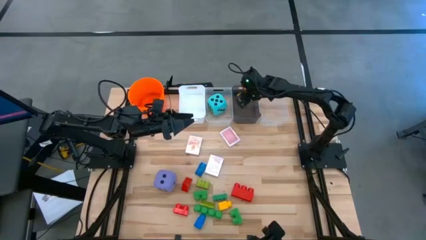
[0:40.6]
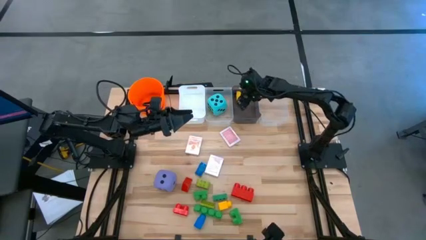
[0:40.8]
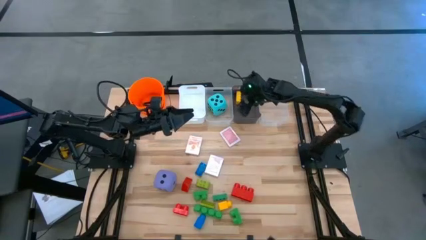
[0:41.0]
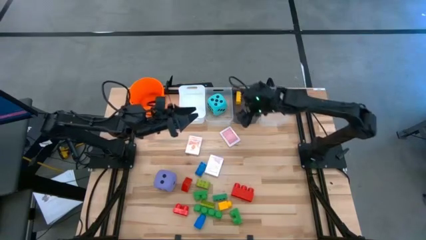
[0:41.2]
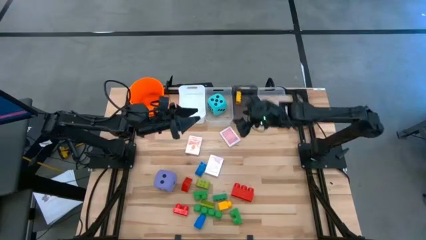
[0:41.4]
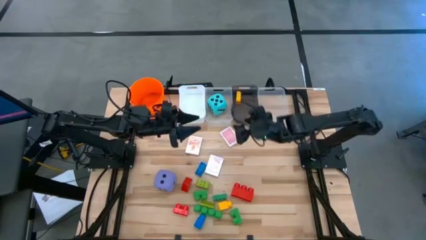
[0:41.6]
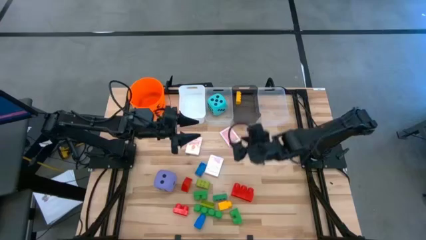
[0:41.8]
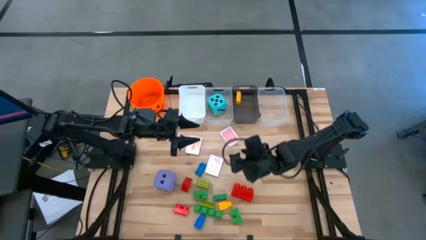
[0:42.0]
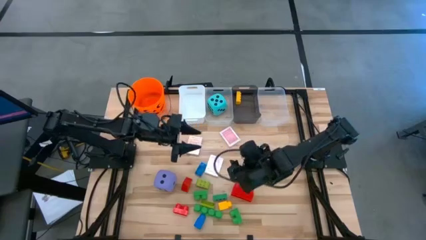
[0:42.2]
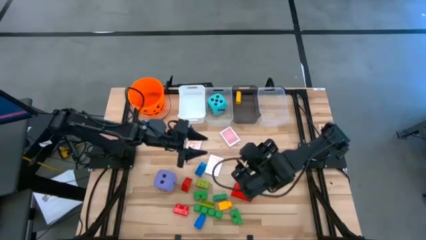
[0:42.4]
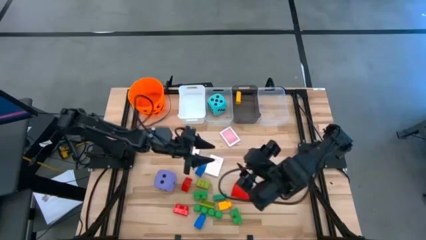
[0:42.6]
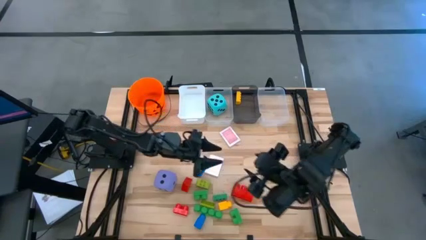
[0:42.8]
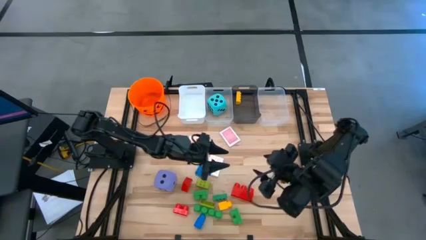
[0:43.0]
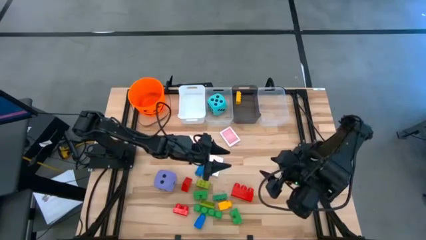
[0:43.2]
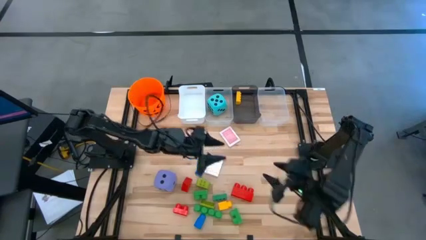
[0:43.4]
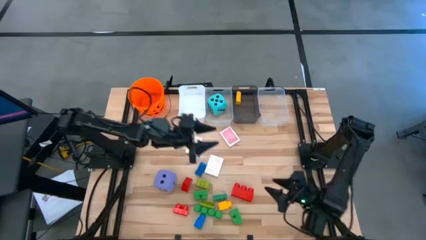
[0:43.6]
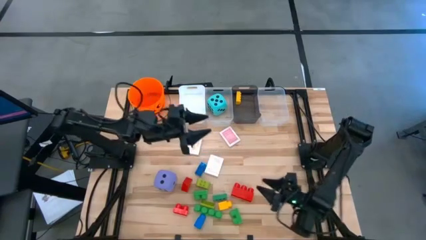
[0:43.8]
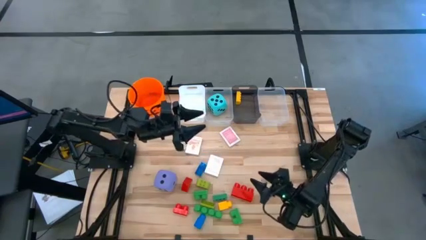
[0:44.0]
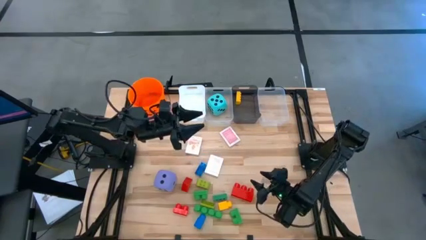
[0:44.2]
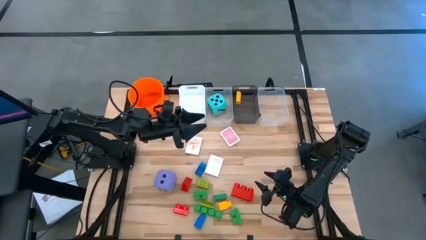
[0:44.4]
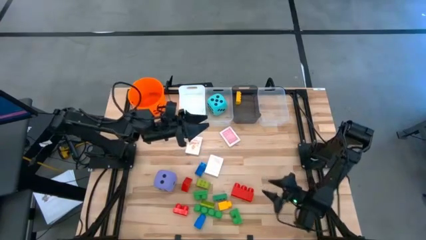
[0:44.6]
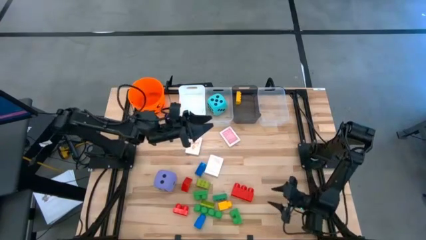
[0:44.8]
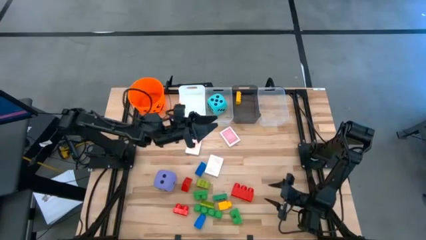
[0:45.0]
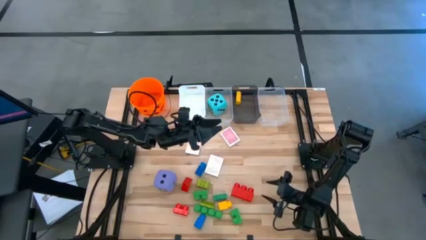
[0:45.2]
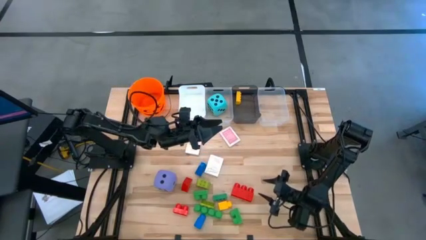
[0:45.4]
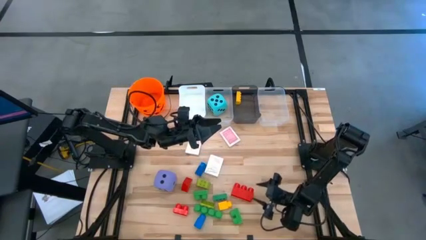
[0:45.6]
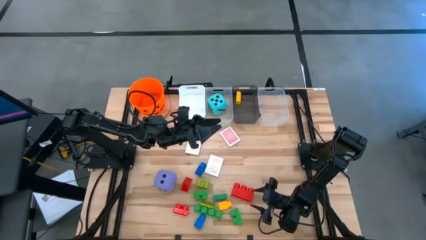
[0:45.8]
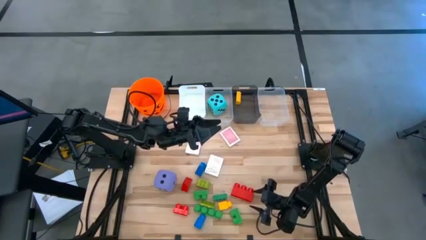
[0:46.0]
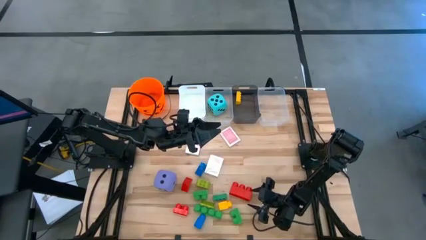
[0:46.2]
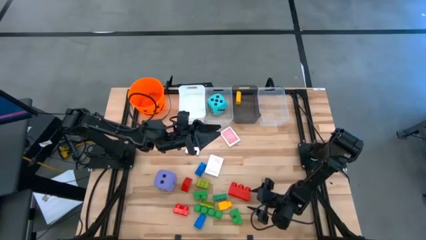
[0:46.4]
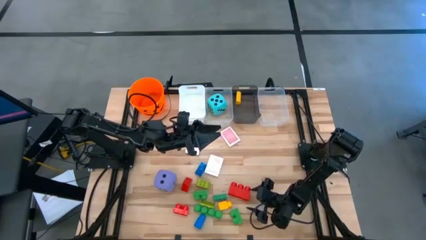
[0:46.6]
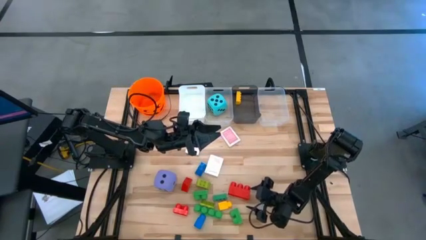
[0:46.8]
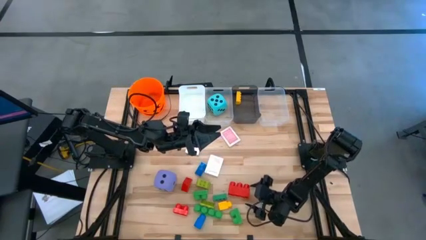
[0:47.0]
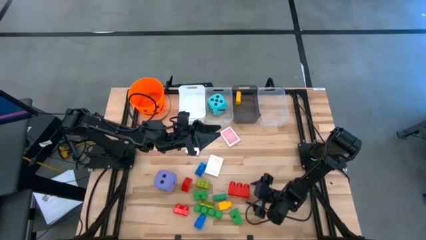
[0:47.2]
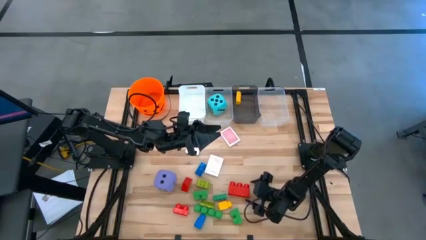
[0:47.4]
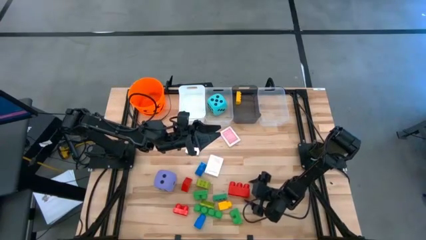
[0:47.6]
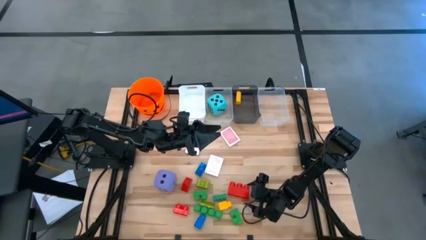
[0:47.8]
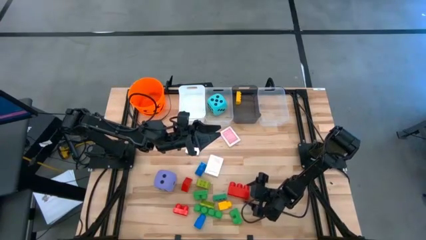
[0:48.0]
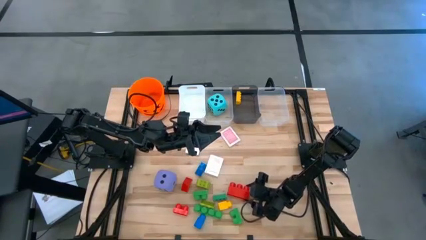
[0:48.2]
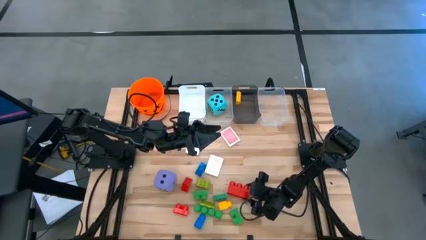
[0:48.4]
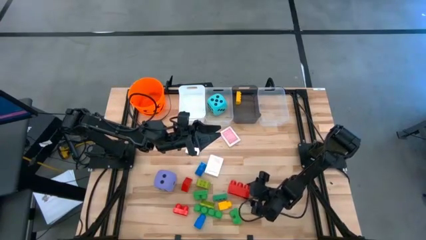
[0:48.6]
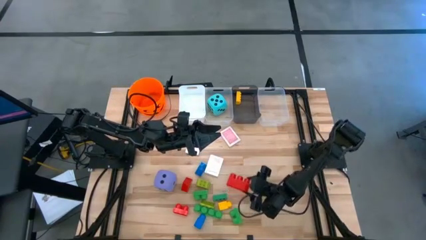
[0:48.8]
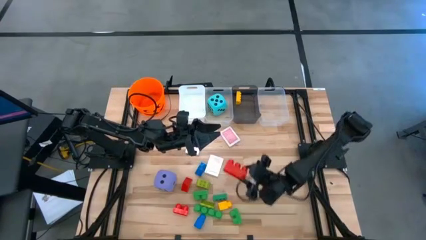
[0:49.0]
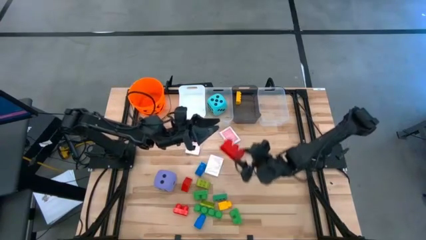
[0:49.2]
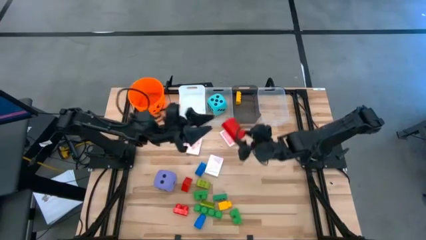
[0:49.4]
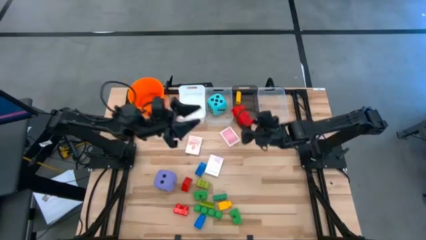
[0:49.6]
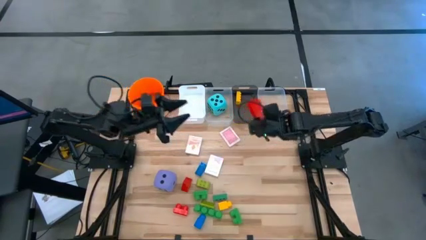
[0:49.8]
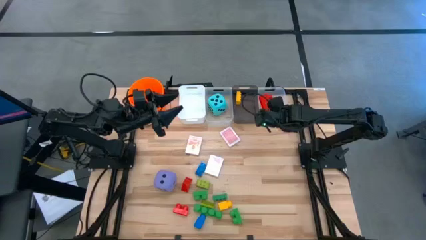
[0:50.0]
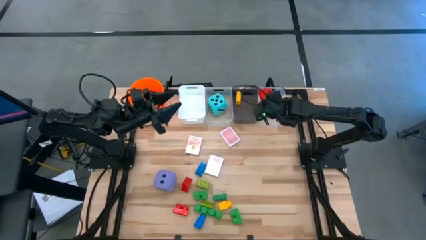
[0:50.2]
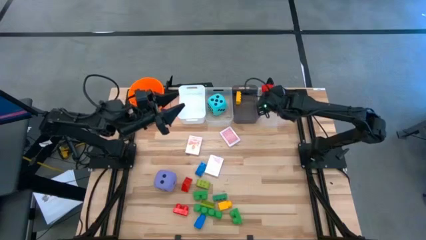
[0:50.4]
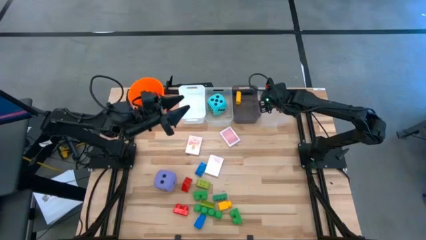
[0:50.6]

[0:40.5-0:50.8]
Task: Pick & Place Toys
Put the large red game piece into the right transparent bin
